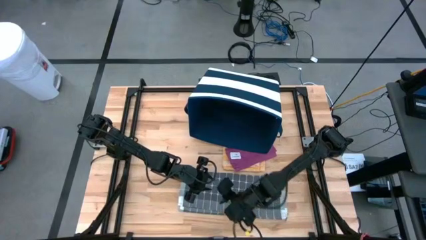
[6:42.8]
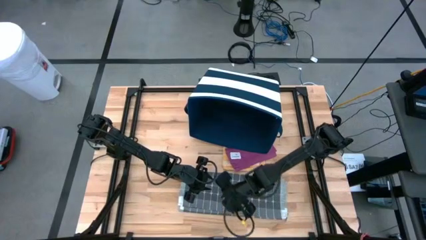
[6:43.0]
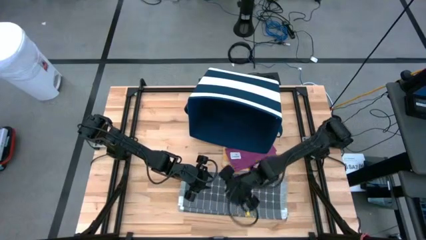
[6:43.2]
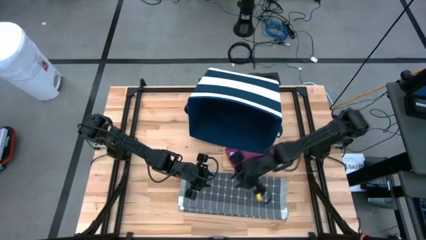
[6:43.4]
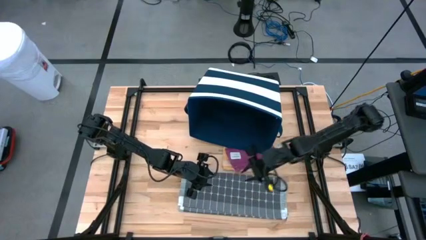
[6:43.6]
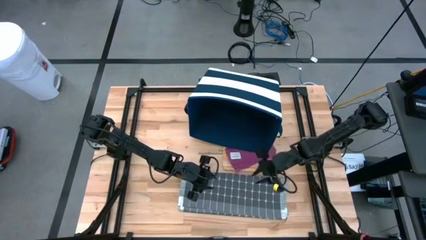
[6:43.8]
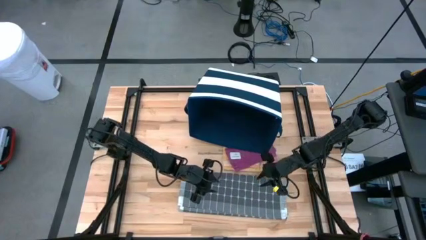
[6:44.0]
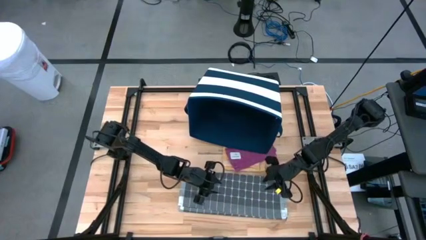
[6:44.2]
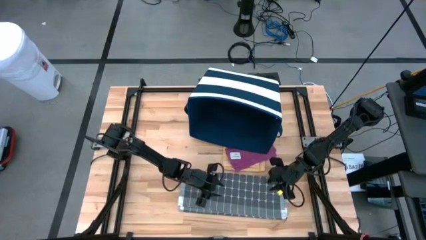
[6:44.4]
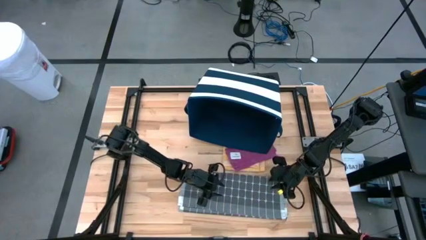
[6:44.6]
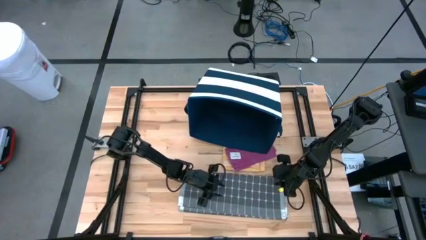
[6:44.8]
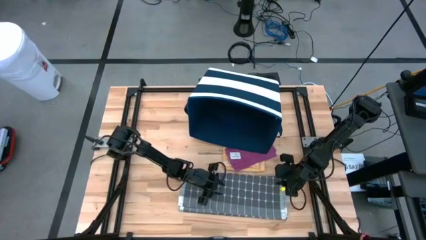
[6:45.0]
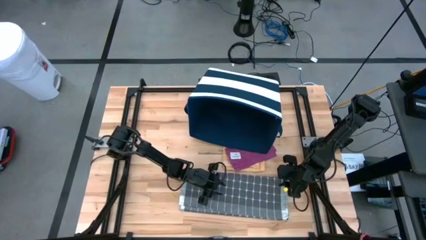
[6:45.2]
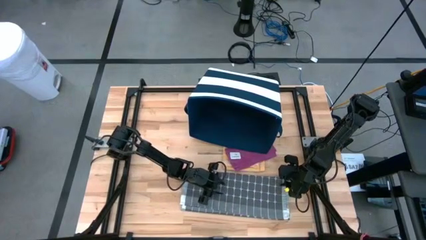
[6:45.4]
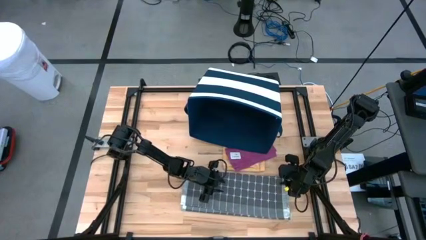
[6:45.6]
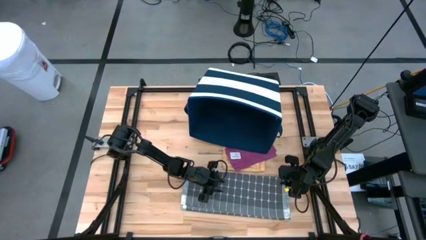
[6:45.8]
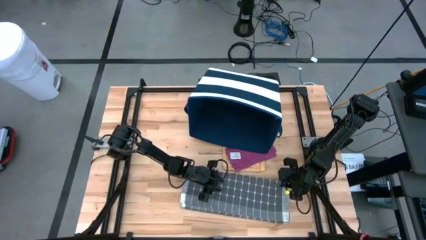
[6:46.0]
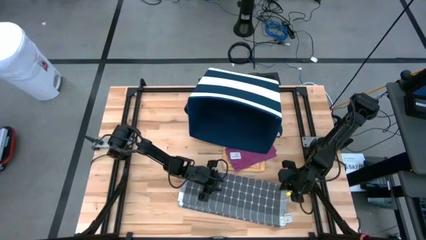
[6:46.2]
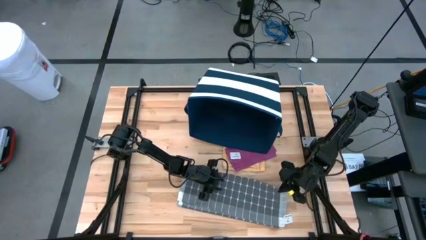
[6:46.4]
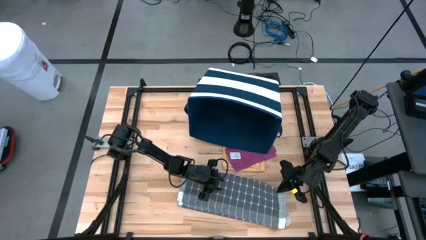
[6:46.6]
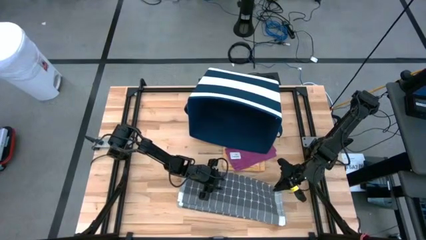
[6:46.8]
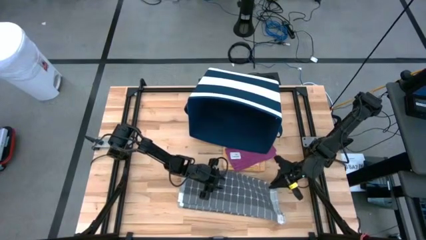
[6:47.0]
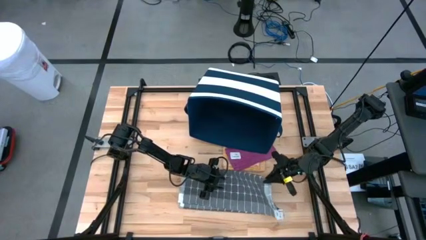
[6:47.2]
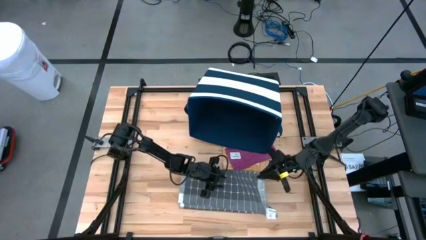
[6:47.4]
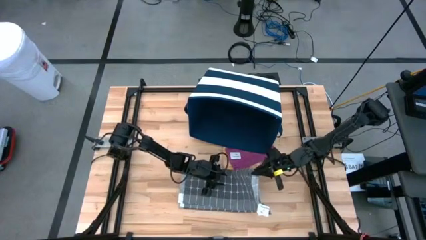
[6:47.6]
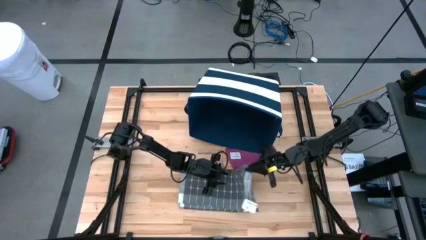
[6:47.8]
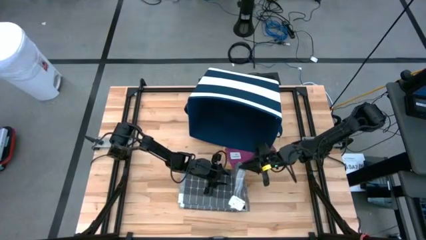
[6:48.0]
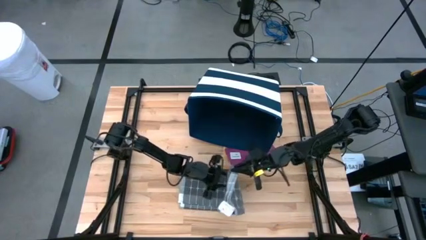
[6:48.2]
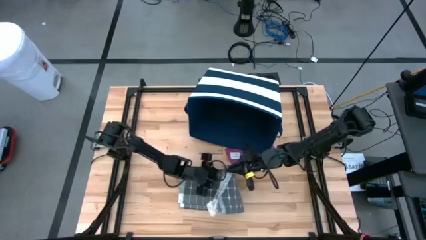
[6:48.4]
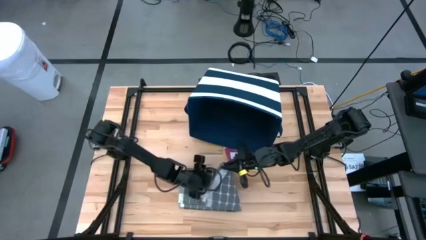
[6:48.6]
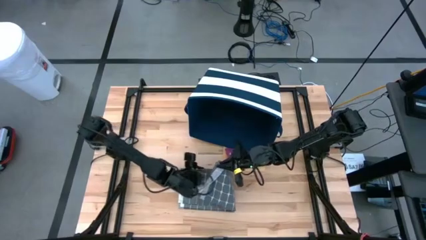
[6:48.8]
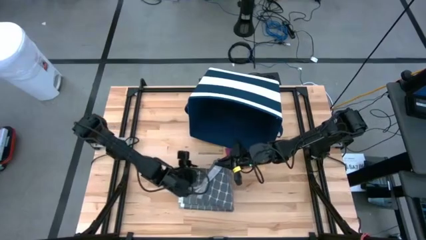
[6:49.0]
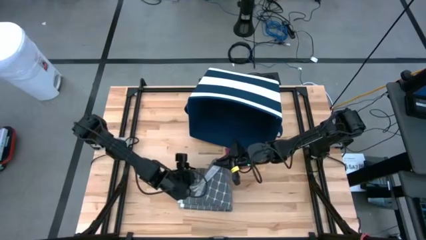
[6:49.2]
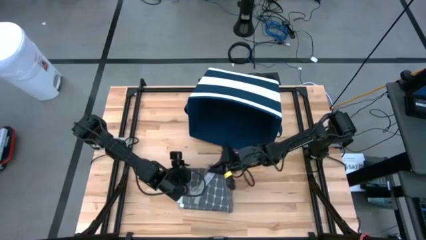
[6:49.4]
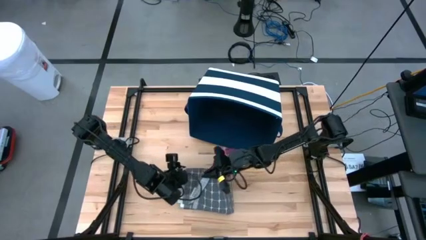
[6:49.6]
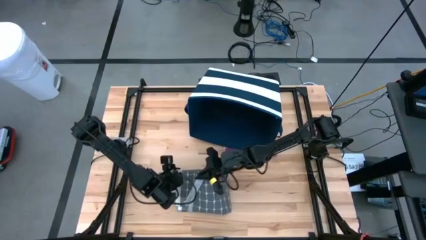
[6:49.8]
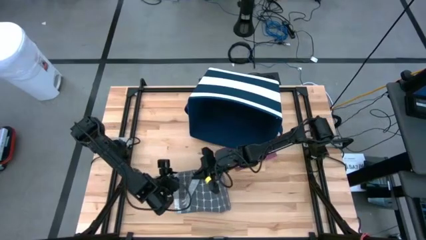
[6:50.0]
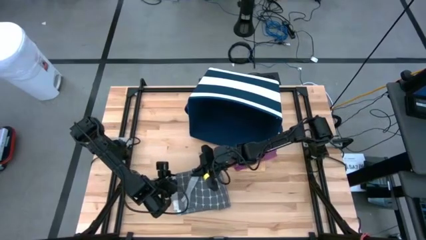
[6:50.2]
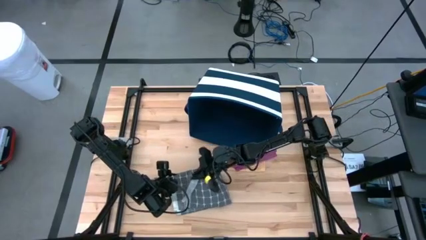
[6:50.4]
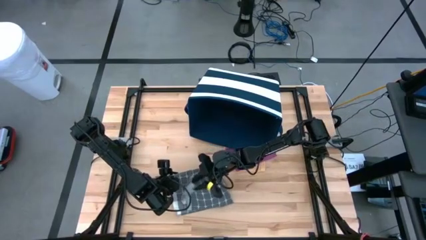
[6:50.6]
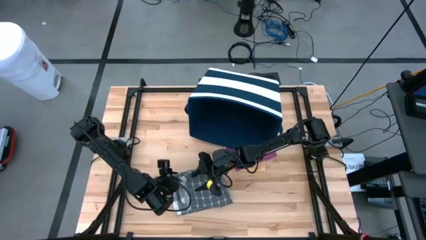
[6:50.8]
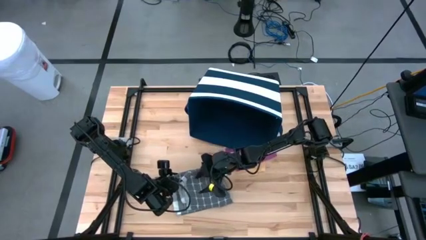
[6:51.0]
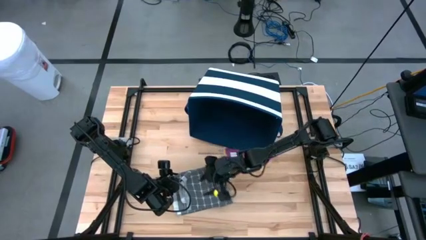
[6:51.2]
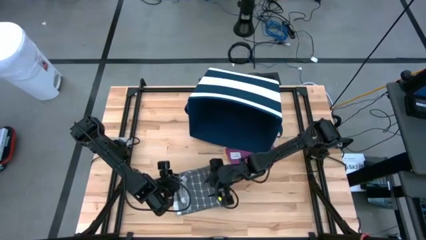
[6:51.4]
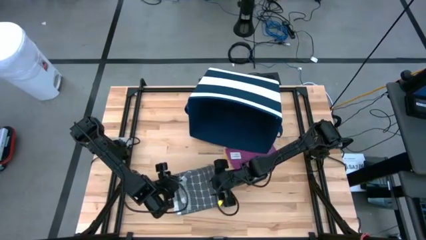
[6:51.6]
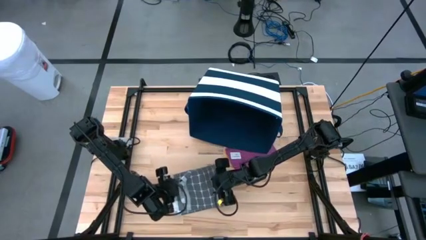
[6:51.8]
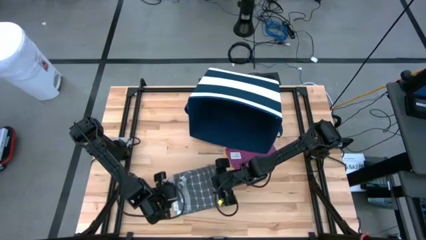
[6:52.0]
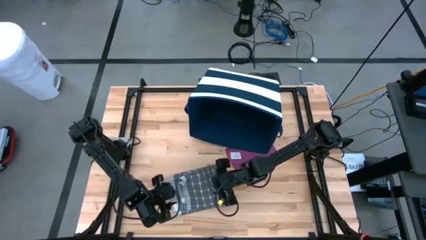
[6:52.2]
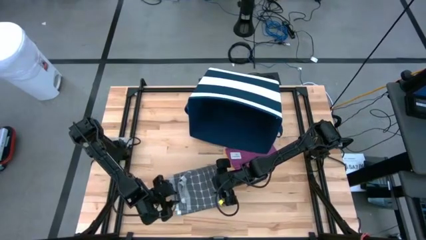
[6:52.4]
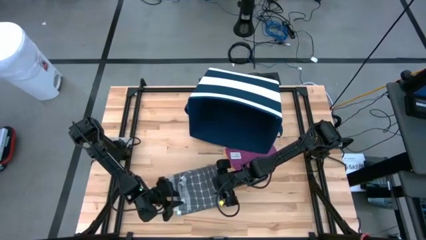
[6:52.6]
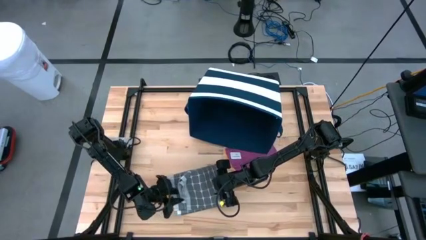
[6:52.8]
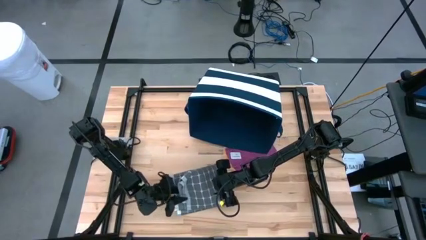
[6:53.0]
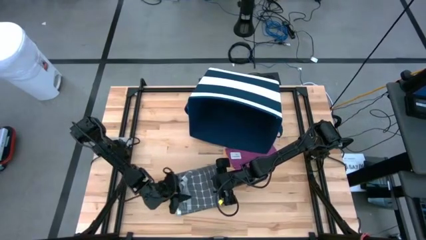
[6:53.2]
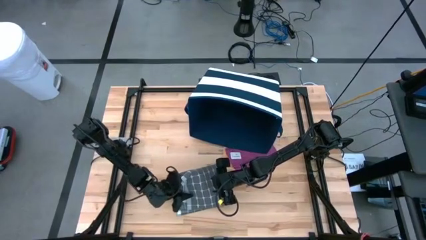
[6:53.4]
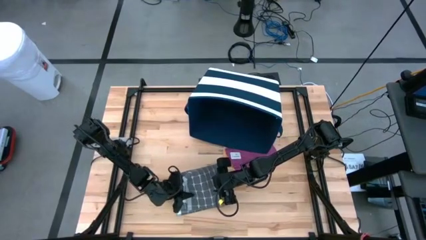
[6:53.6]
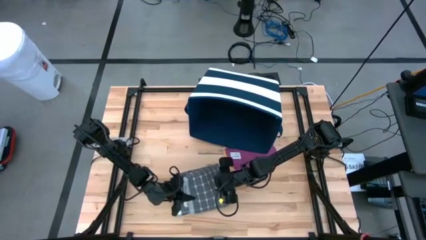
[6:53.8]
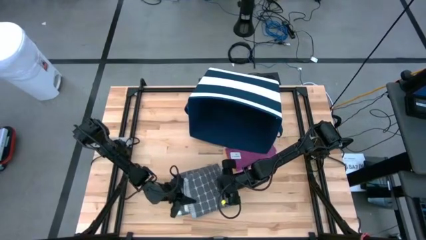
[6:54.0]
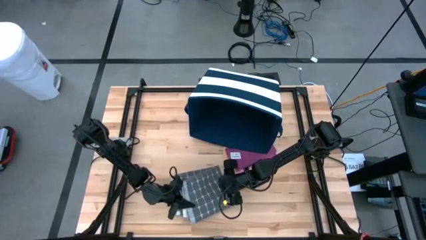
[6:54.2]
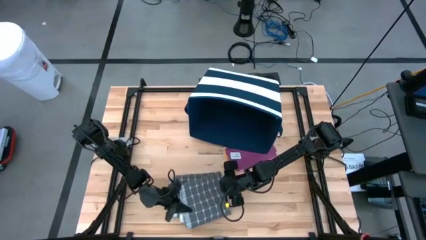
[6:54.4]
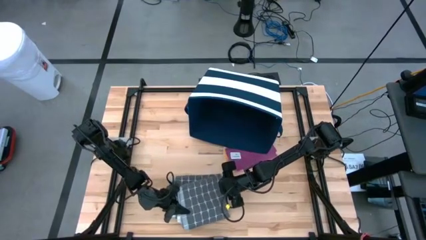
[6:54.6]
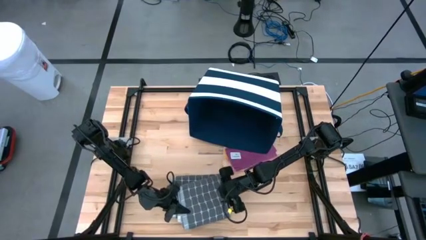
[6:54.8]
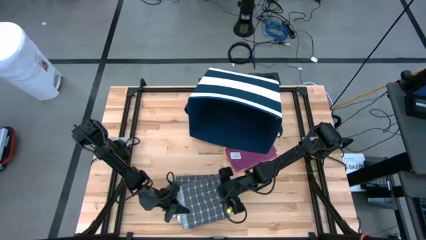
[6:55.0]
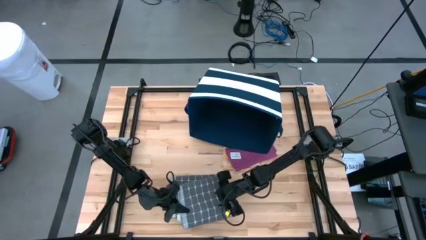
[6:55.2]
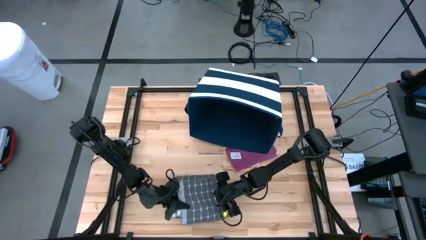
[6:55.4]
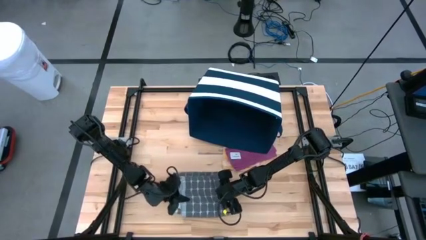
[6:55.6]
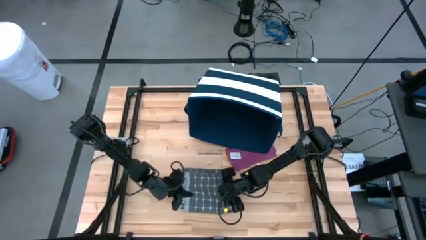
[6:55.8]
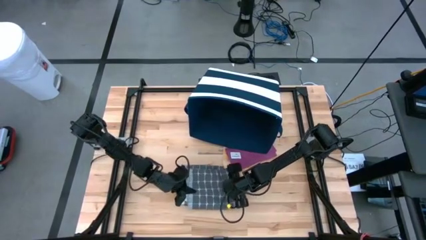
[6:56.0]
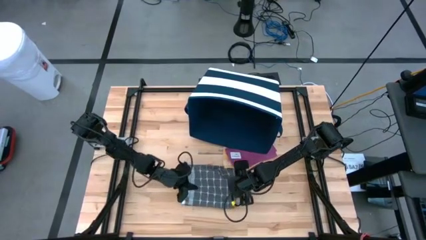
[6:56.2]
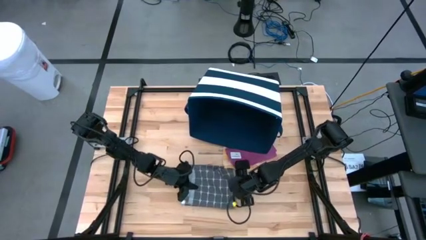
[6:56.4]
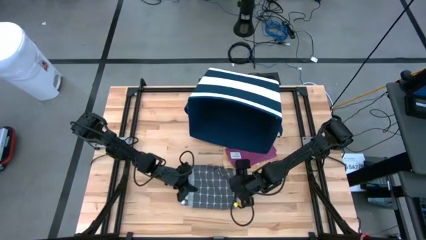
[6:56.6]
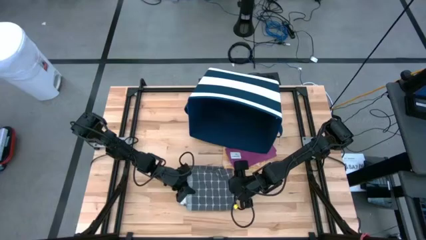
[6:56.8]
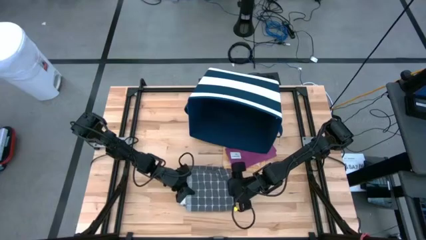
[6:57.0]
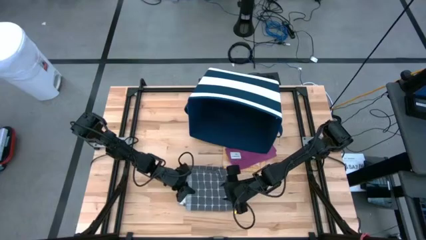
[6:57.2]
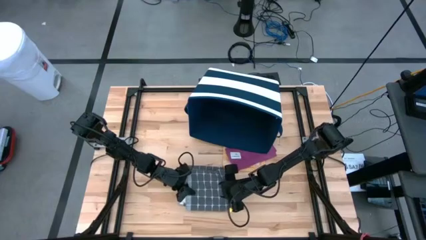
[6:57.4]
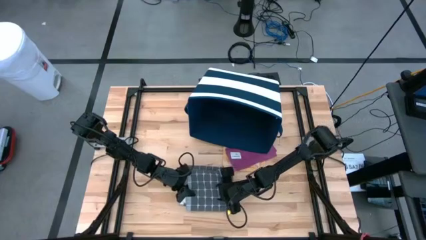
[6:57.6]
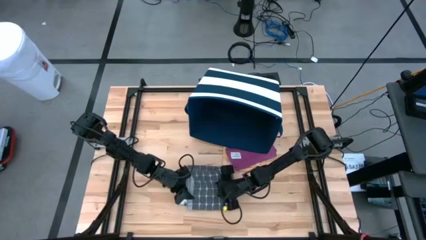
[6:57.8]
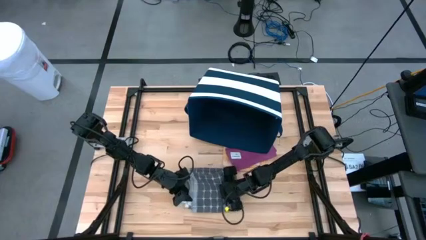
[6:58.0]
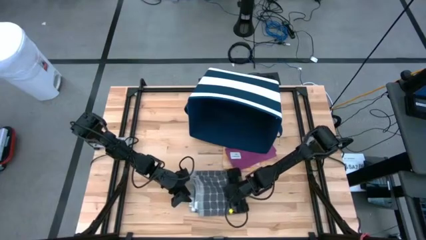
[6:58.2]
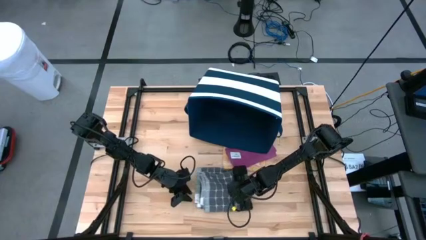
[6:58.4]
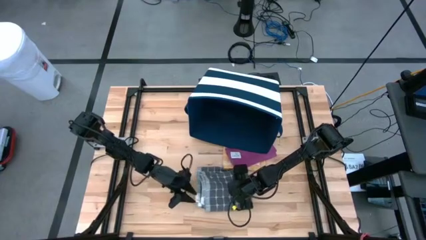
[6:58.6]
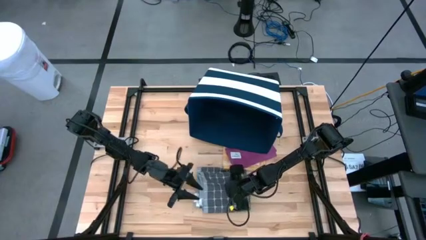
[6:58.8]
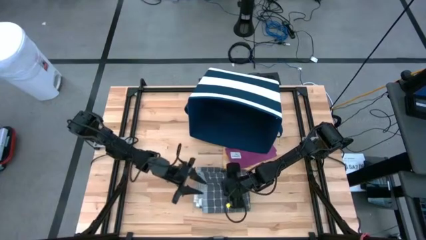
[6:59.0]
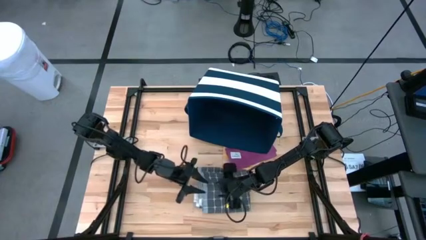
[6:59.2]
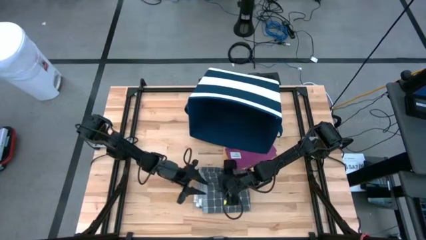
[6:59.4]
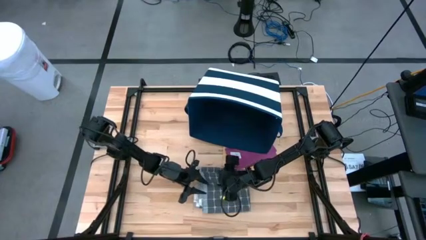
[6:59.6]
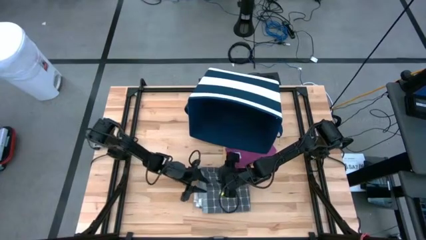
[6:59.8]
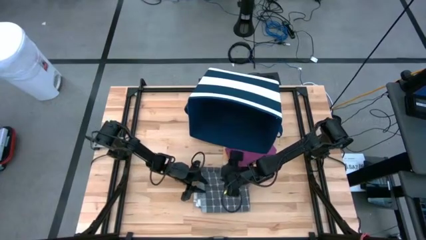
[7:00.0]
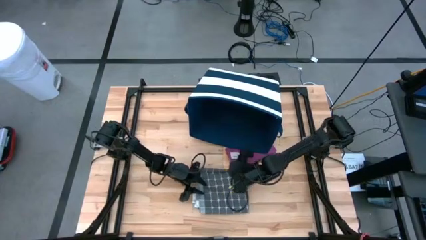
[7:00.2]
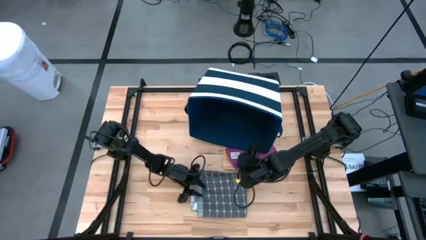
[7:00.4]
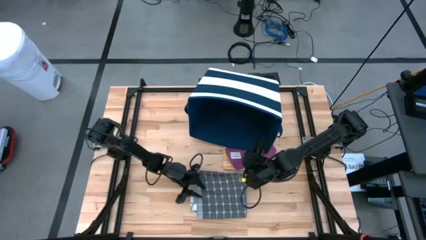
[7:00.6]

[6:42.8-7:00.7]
Task: Fold towel
Fold the gray towel
